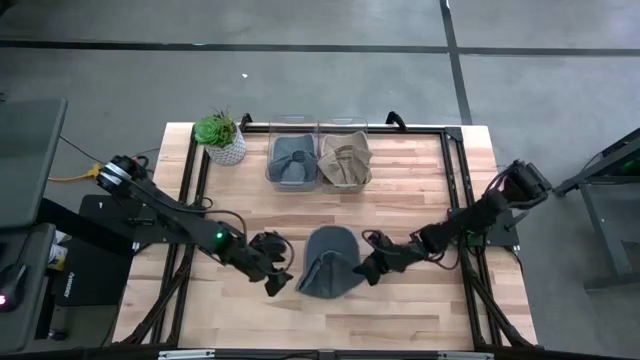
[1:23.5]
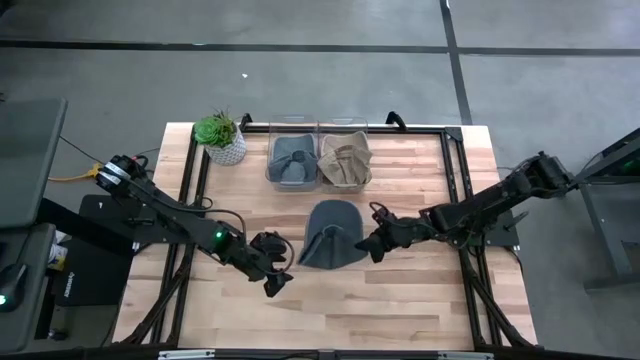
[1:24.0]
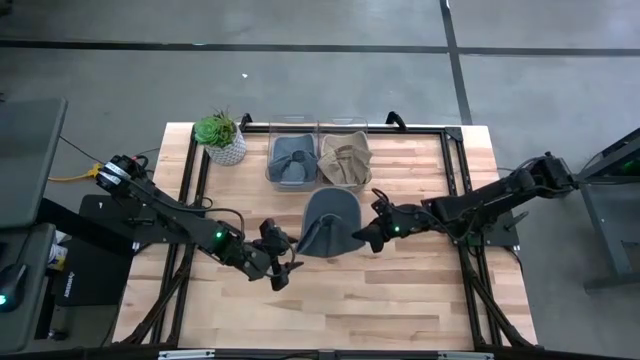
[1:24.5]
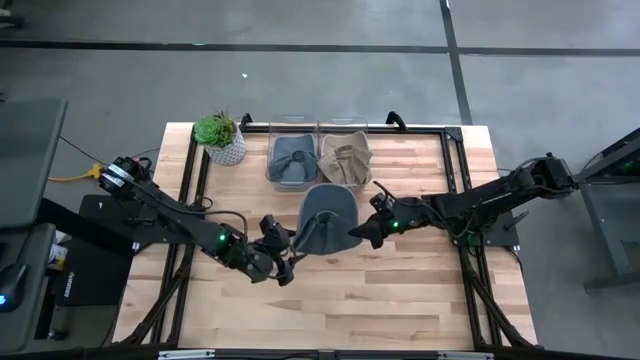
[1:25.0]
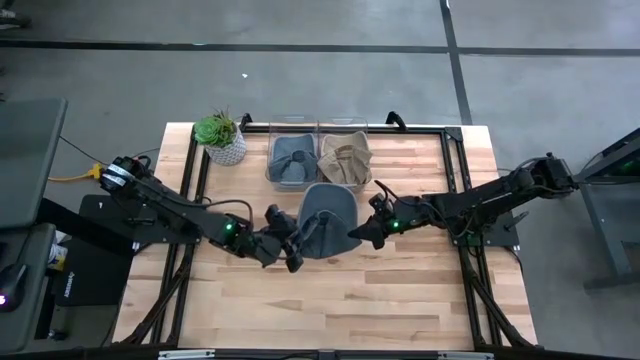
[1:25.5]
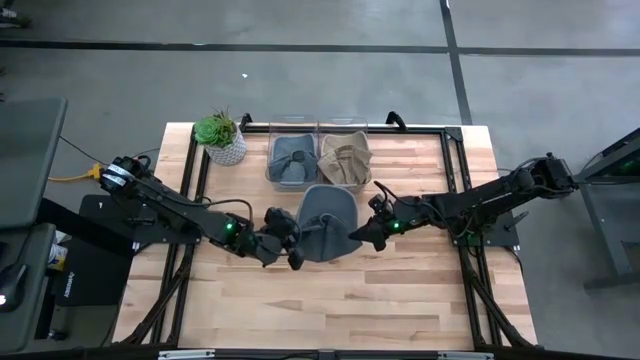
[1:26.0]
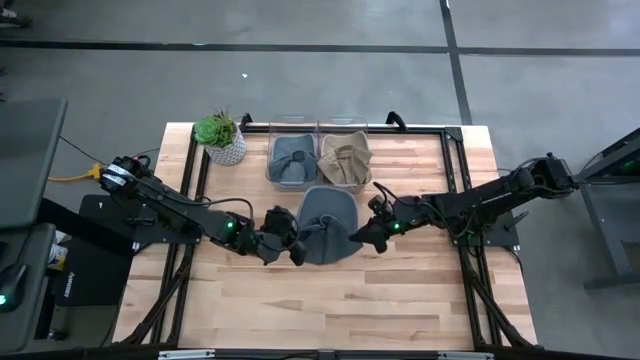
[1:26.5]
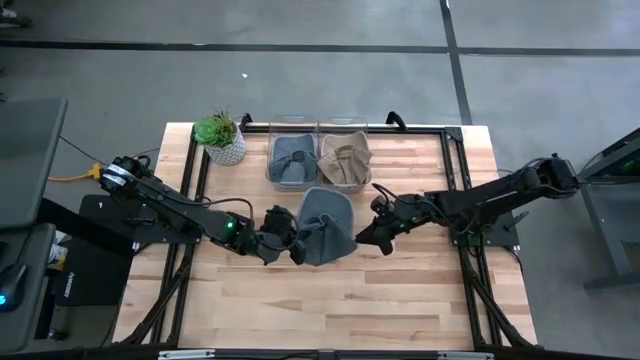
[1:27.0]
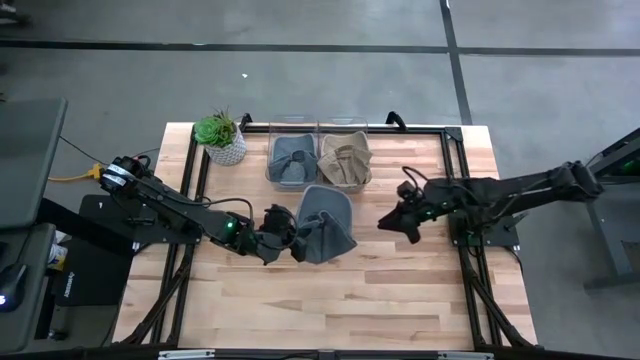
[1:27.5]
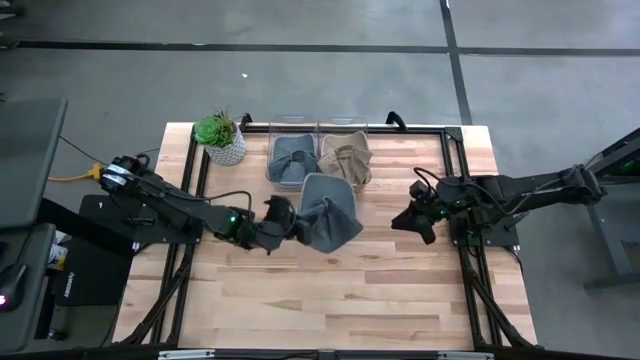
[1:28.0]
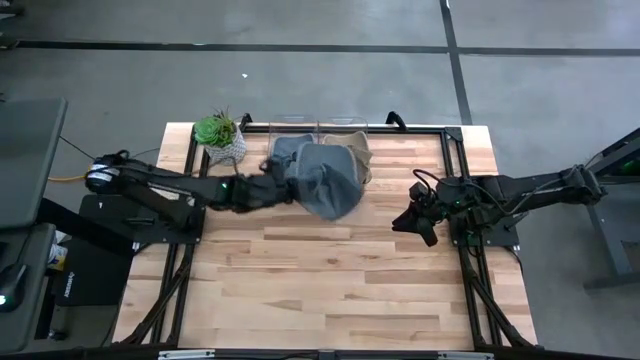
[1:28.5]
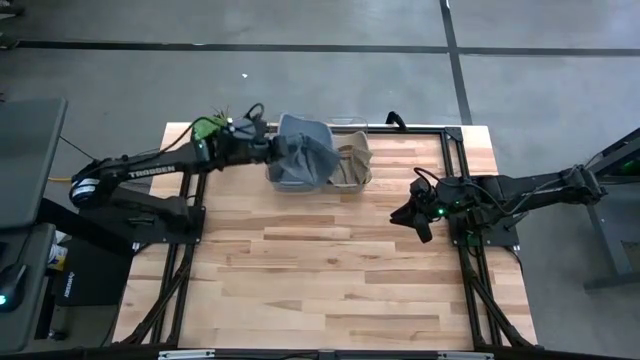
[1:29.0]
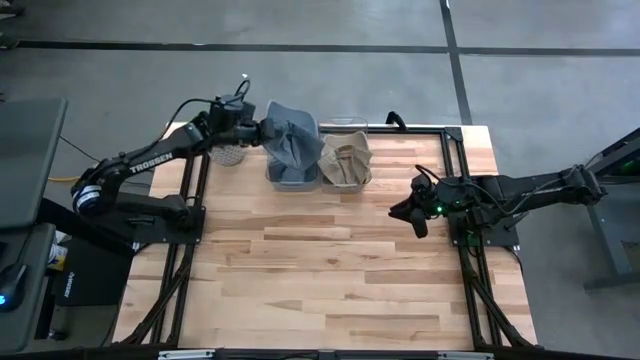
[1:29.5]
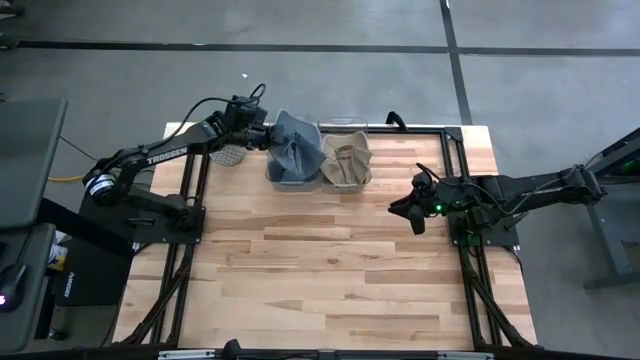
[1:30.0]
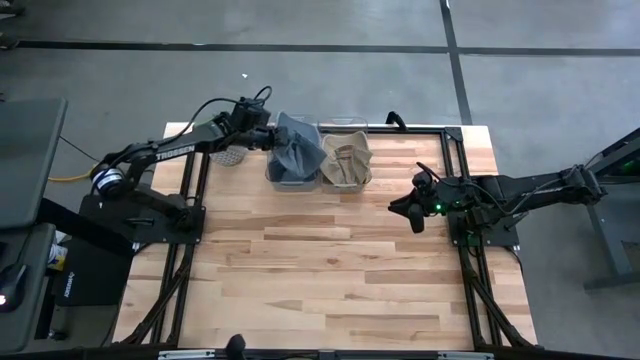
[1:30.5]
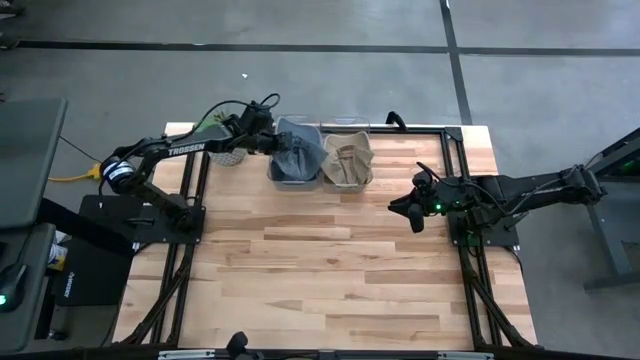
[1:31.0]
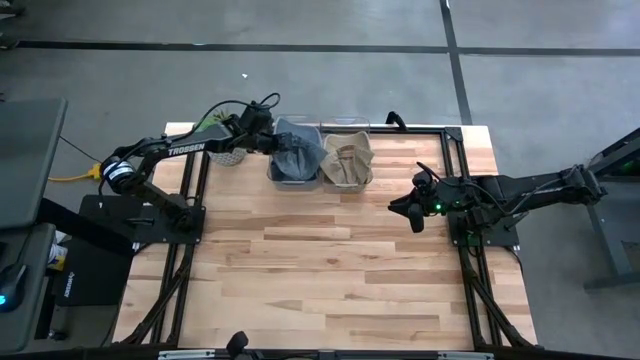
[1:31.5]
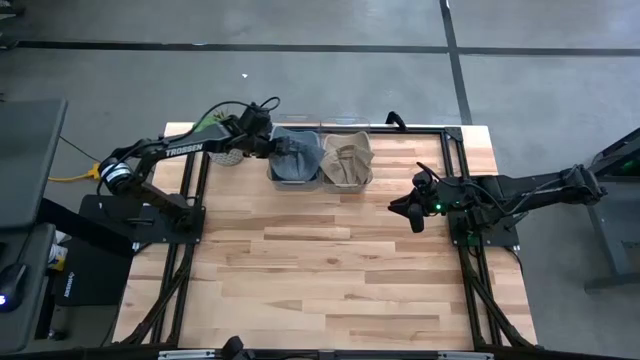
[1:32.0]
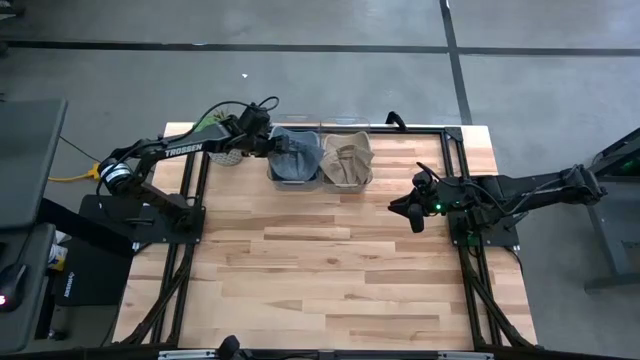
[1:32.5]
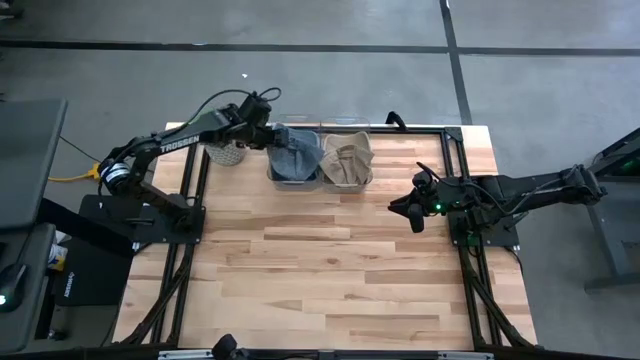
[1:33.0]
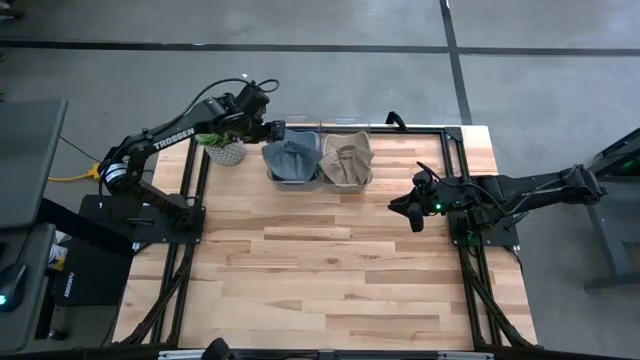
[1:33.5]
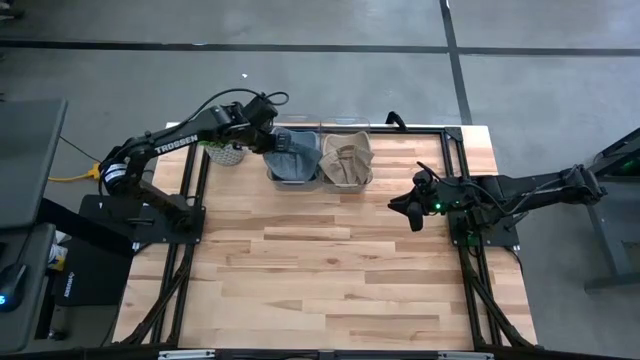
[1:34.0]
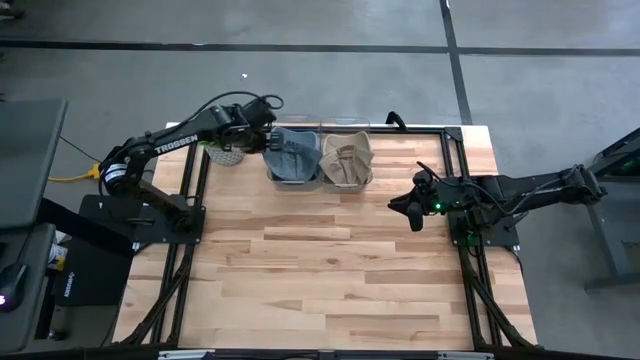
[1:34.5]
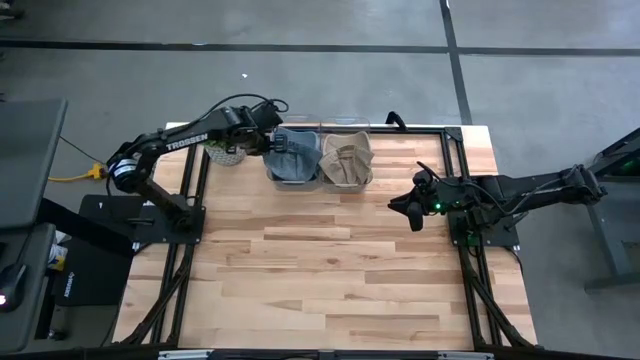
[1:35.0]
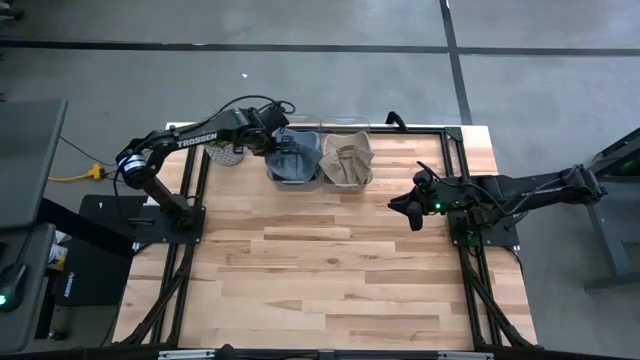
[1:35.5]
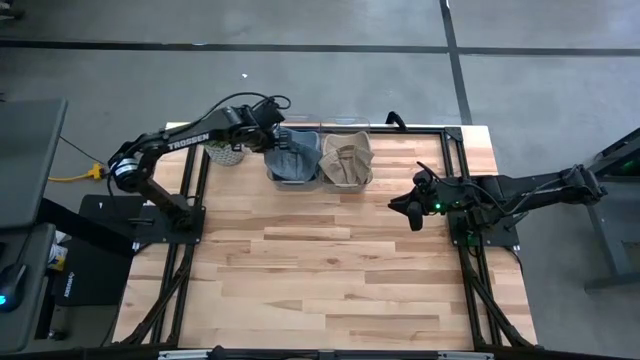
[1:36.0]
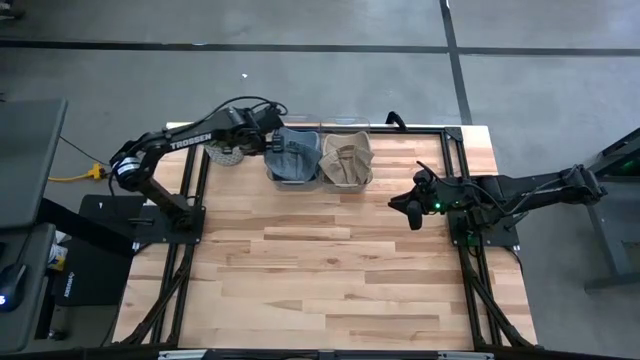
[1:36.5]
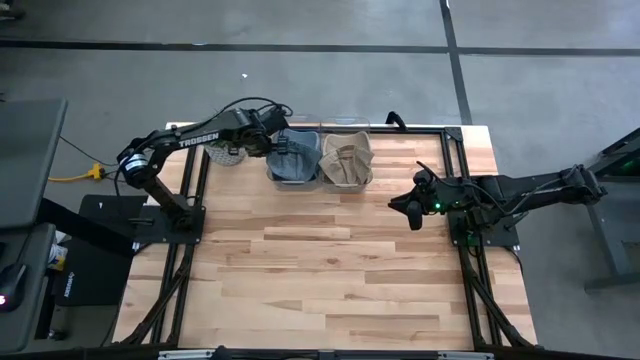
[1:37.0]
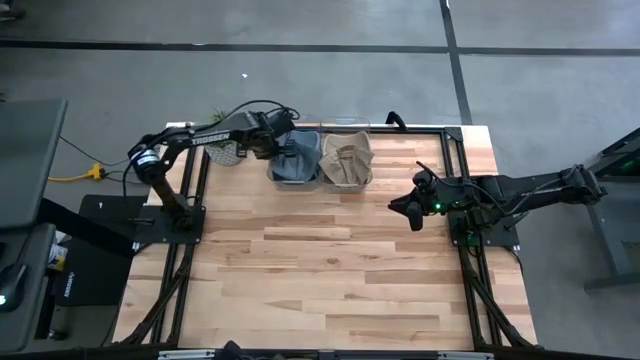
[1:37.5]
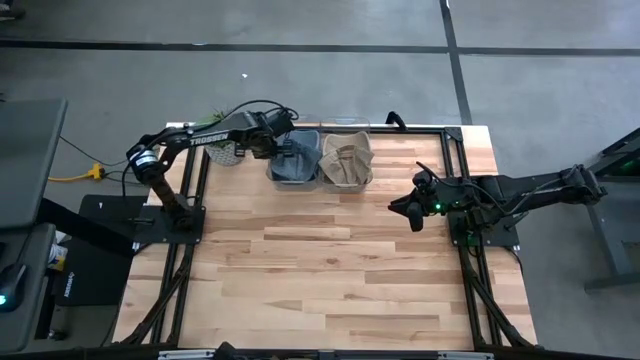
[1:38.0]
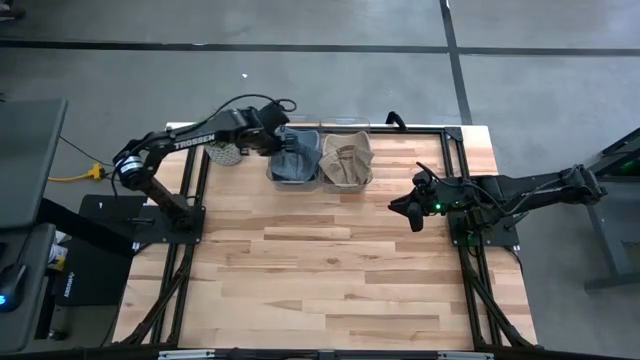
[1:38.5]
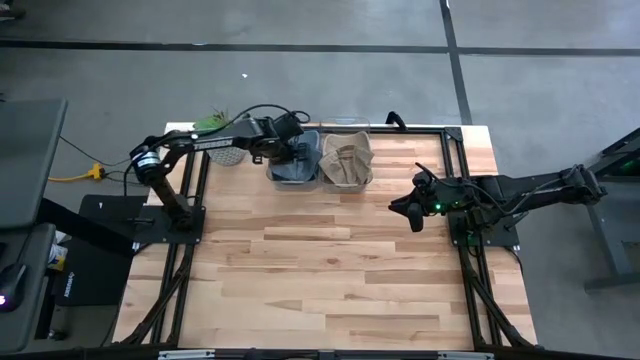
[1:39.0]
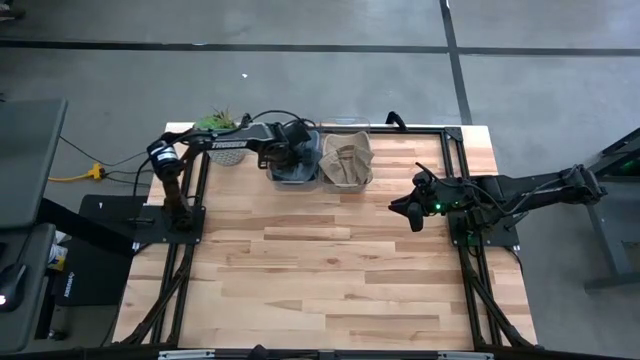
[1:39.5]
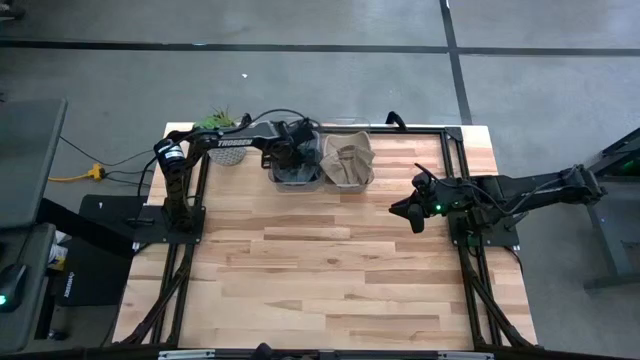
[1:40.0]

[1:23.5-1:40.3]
Task: Pick & Place hat
Put the gray cap into the left transparent bin

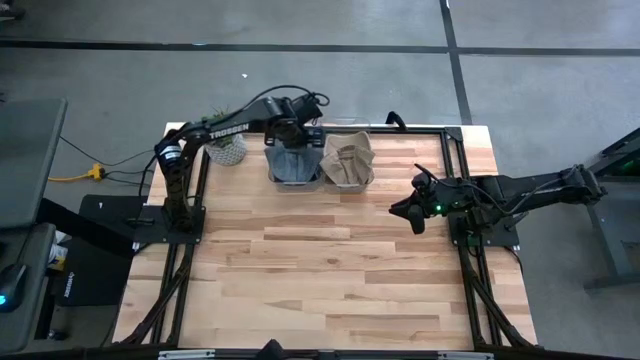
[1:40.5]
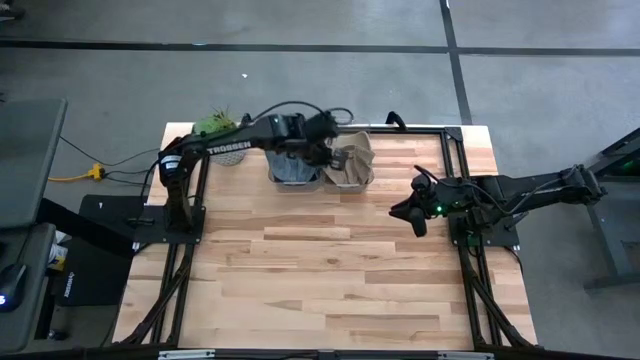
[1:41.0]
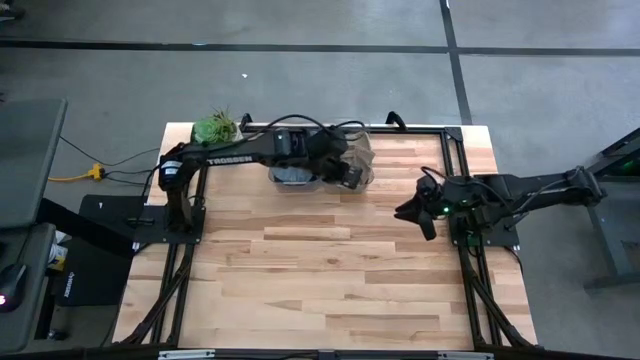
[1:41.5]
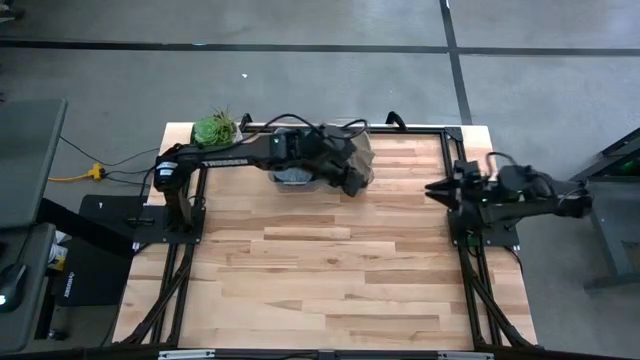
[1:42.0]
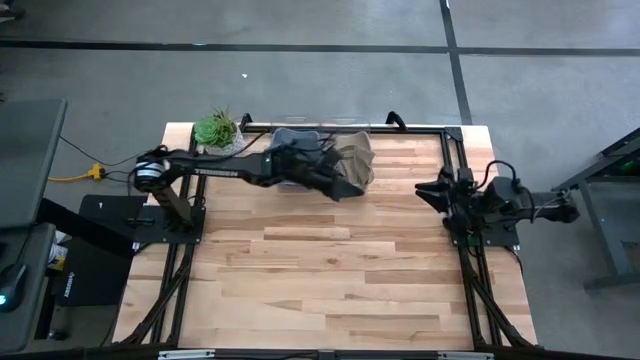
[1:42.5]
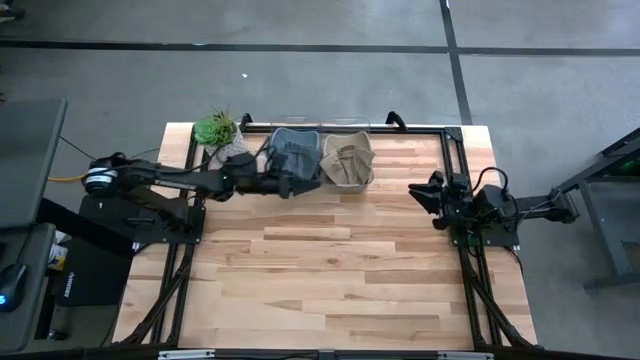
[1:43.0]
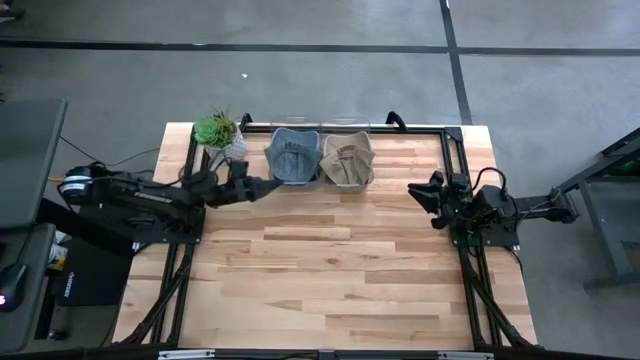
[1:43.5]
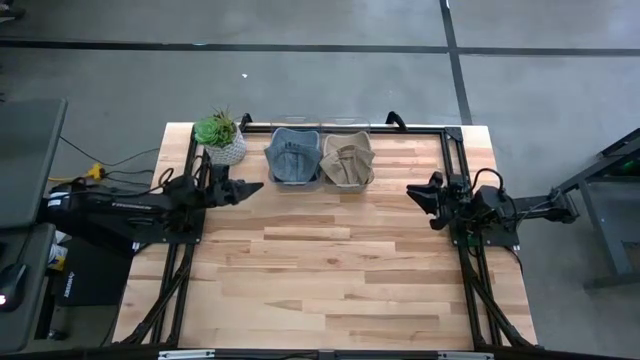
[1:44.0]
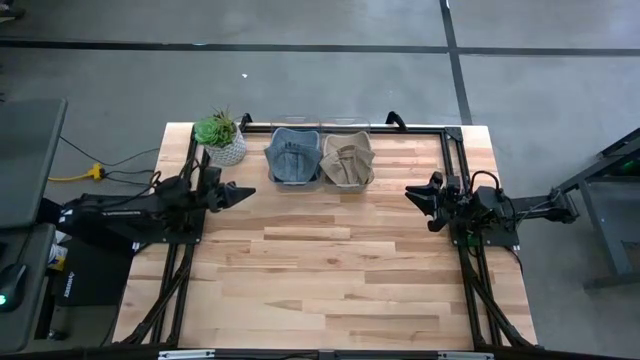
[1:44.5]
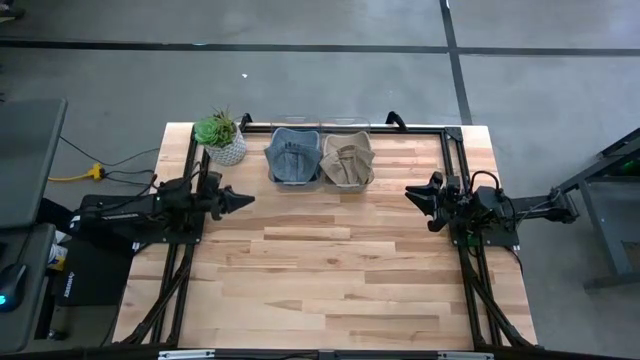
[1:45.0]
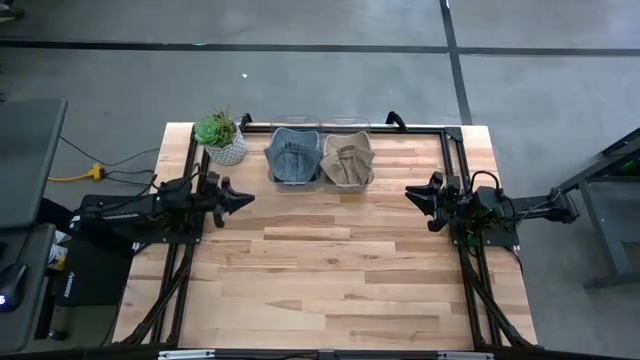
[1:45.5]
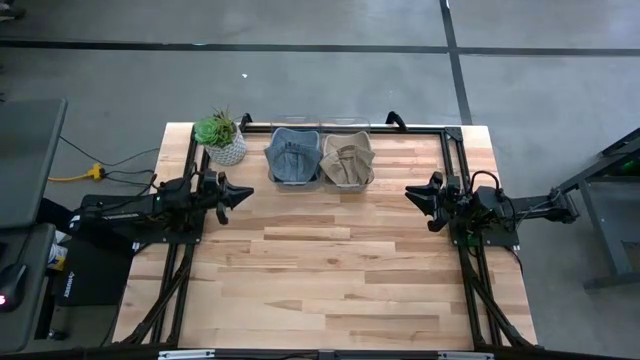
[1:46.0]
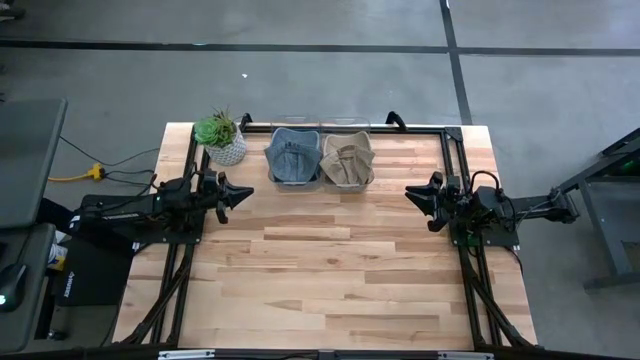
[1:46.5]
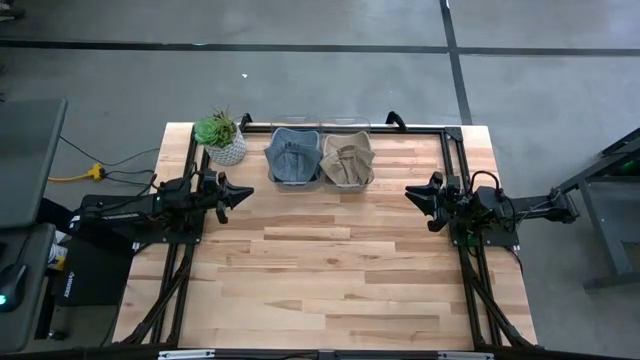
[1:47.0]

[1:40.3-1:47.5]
Return to Home Position
